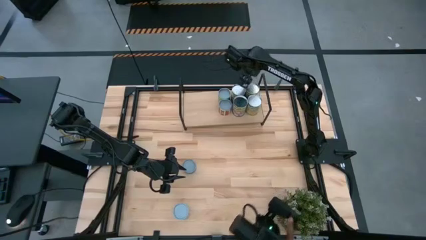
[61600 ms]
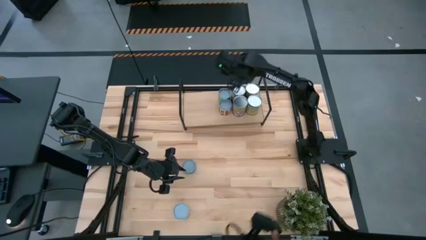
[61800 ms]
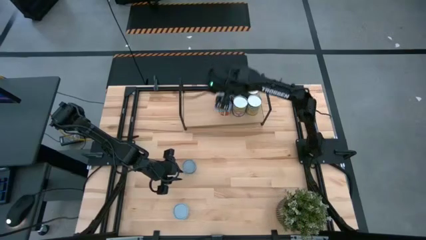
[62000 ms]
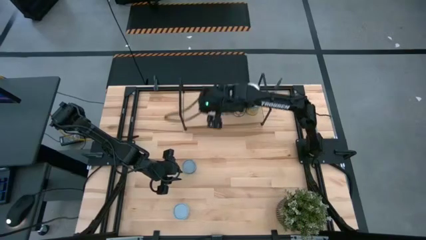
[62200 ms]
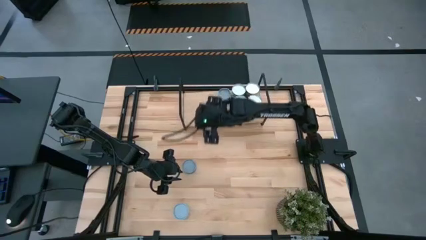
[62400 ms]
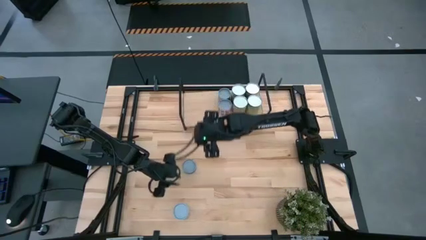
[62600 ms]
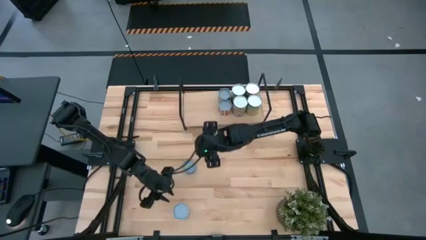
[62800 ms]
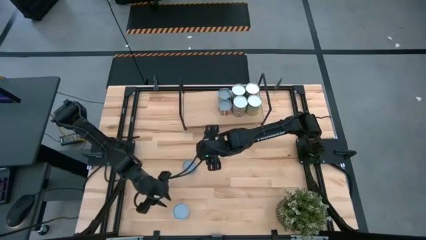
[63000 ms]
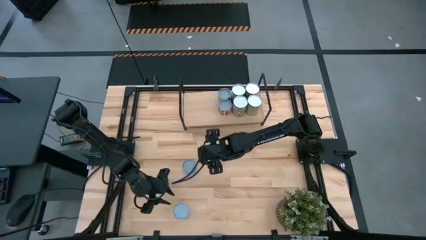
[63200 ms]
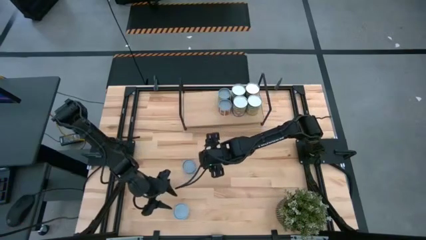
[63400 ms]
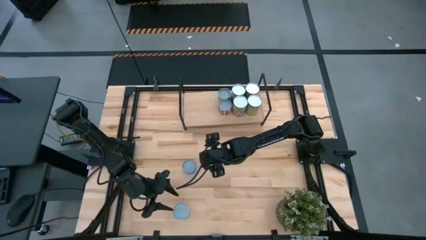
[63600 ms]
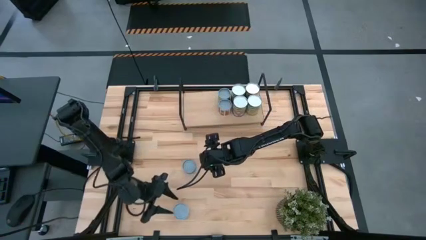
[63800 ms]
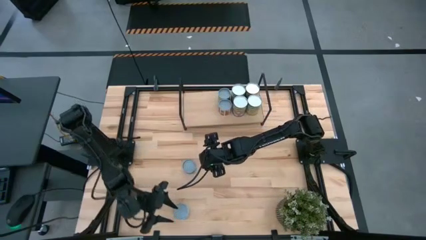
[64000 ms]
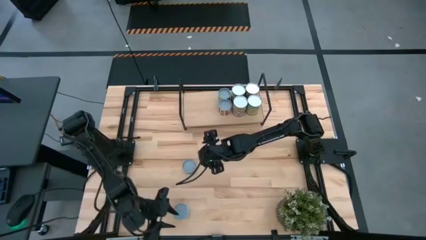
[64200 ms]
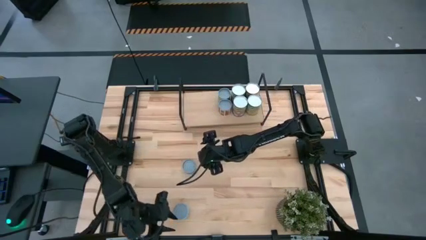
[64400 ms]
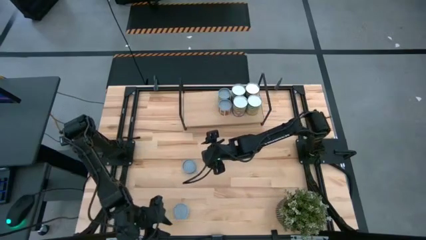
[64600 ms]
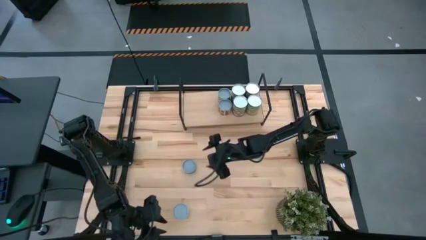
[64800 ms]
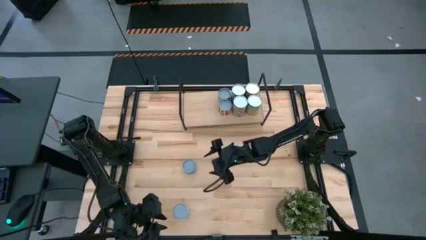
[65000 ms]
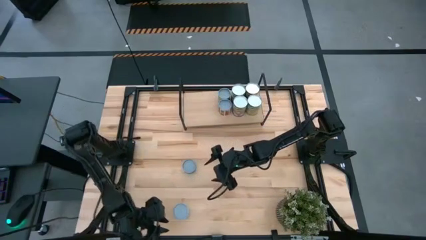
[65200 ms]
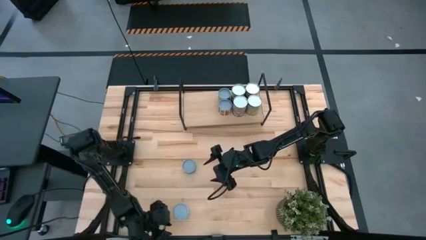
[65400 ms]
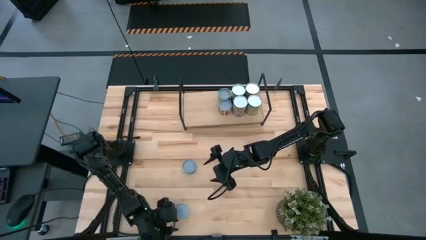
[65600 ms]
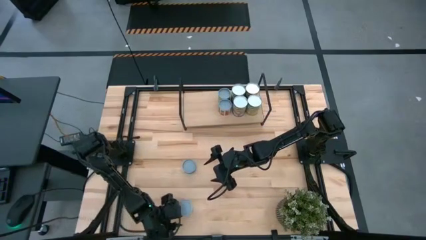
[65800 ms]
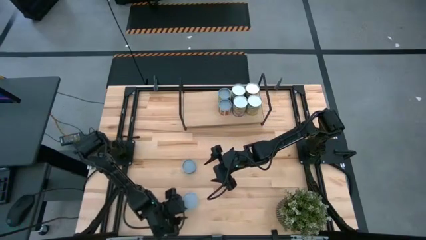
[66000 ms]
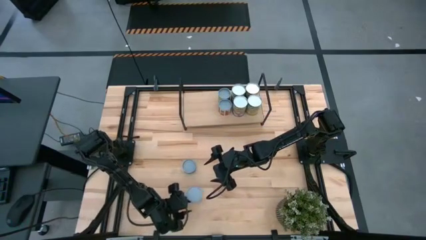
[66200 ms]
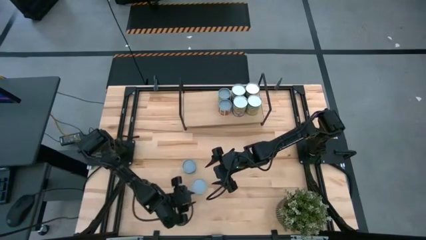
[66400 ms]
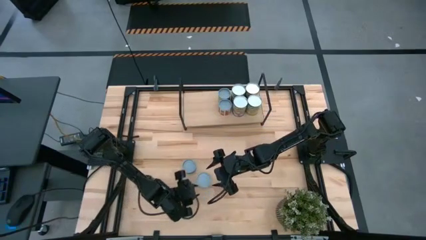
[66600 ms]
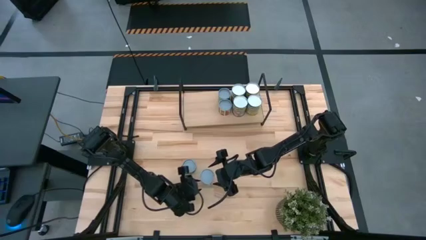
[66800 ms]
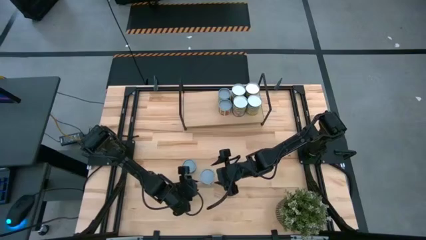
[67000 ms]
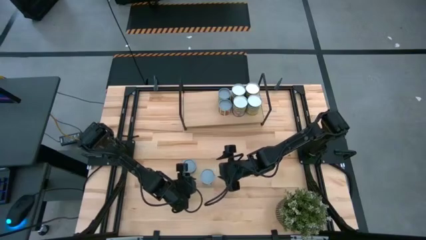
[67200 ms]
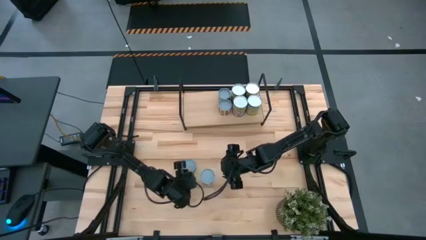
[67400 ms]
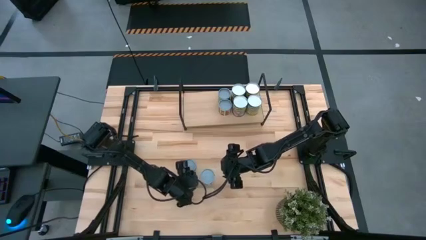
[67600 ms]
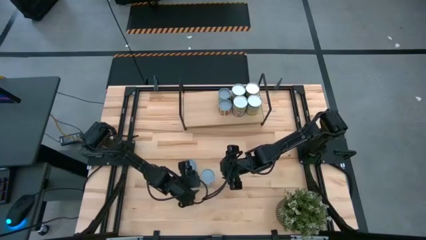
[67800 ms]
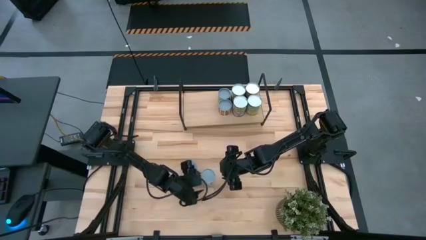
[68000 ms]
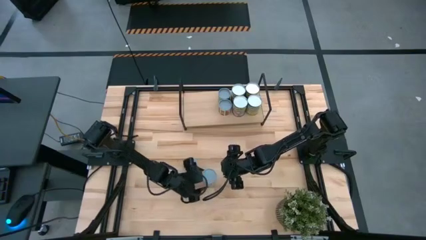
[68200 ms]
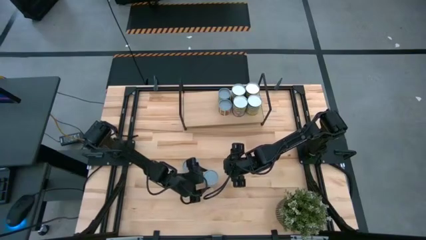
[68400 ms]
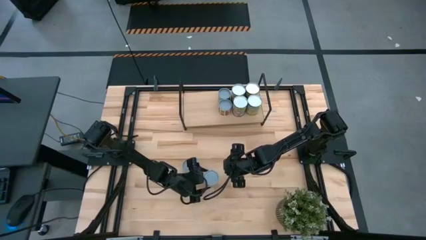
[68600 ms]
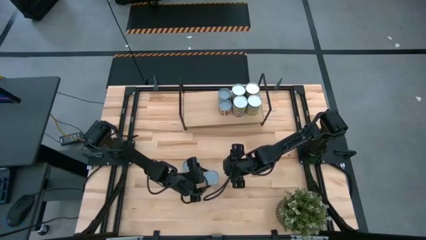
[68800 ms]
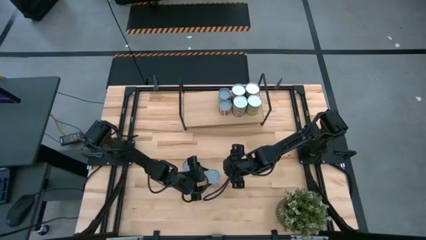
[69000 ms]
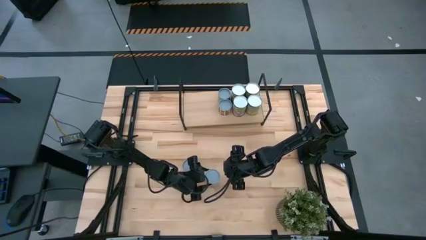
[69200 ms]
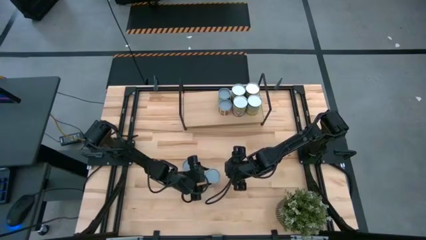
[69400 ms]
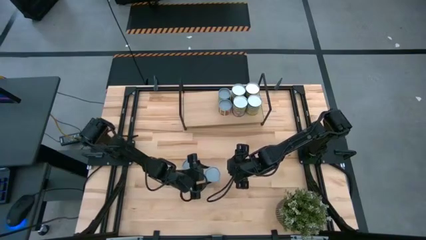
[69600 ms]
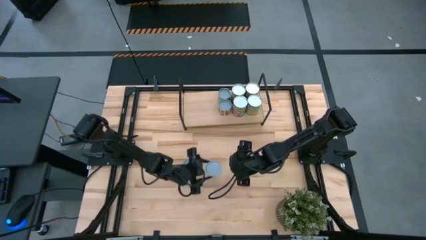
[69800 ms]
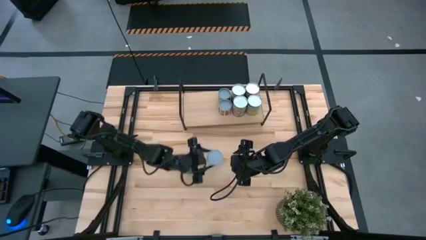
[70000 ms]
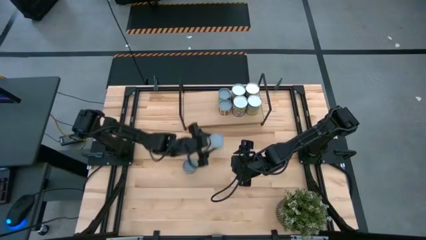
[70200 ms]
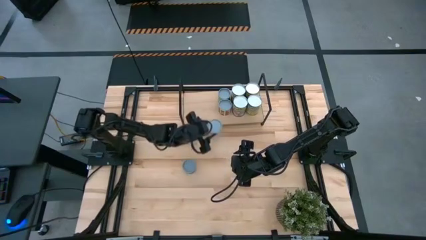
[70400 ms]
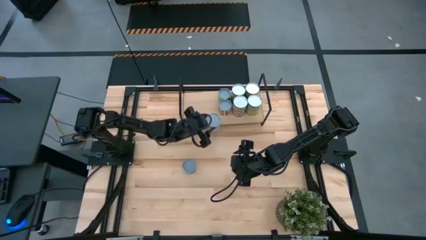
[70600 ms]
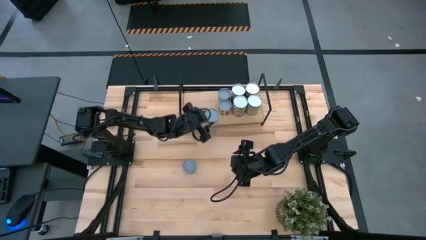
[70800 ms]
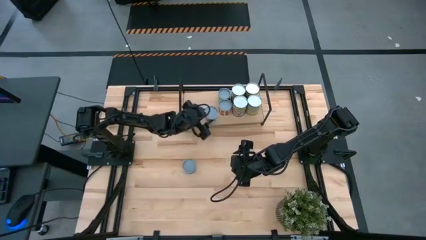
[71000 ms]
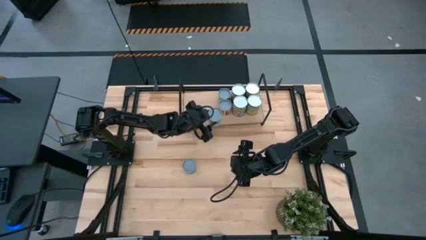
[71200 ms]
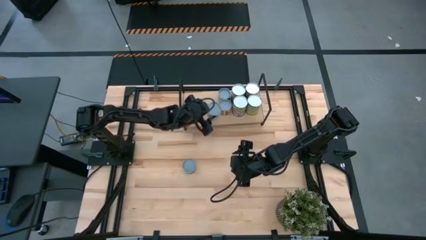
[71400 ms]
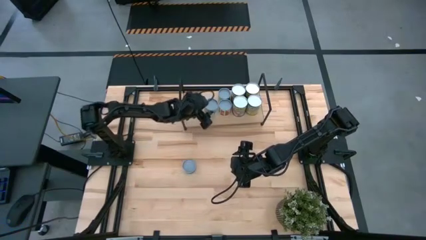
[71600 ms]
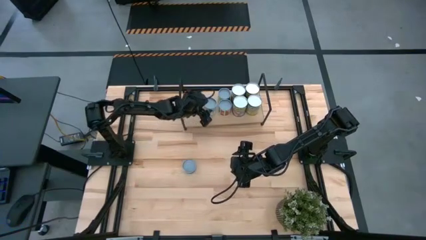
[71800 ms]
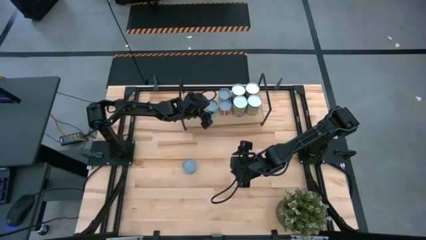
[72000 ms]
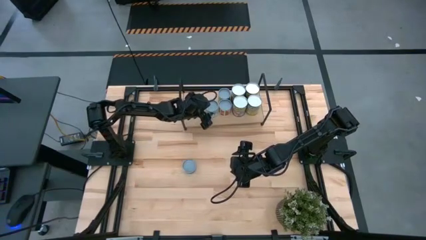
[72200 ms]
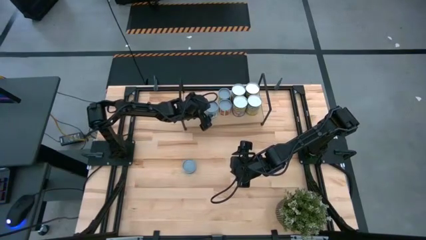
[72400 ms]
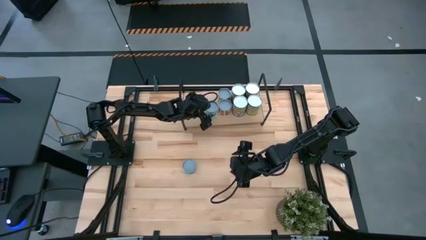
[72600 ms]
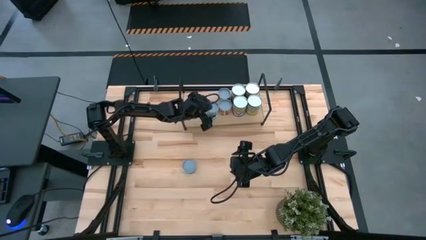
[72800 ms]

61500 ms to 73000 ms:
Task: Pick and place cans onto a shelf
Put the canned mix vegetable on the shelf
